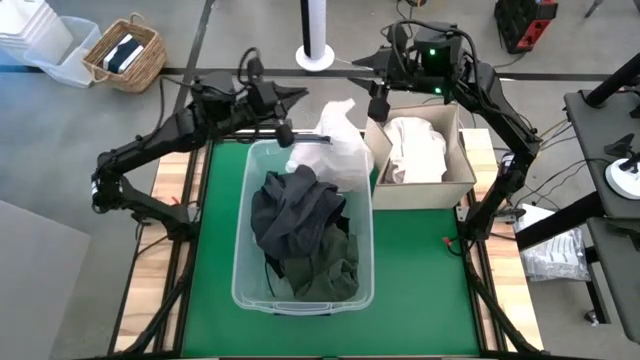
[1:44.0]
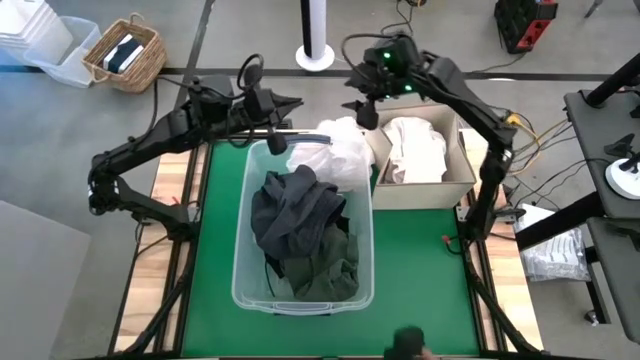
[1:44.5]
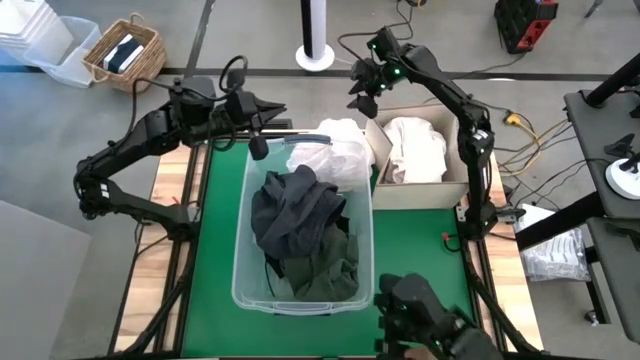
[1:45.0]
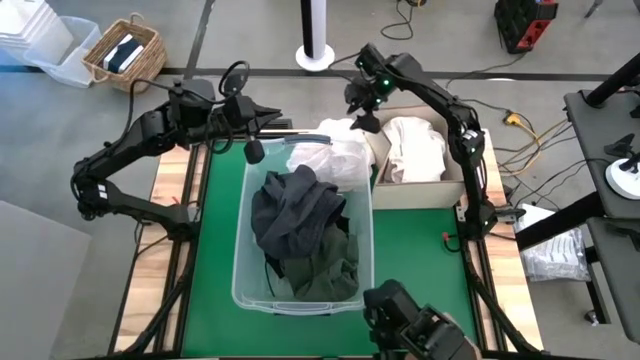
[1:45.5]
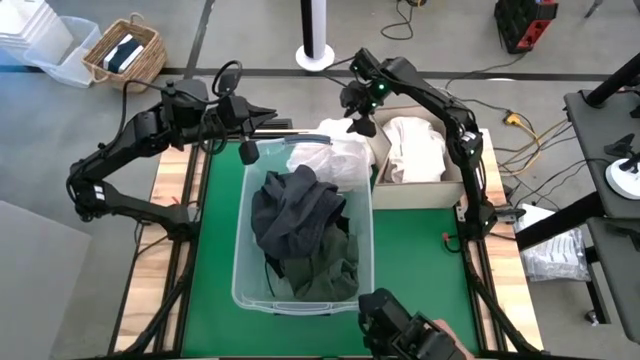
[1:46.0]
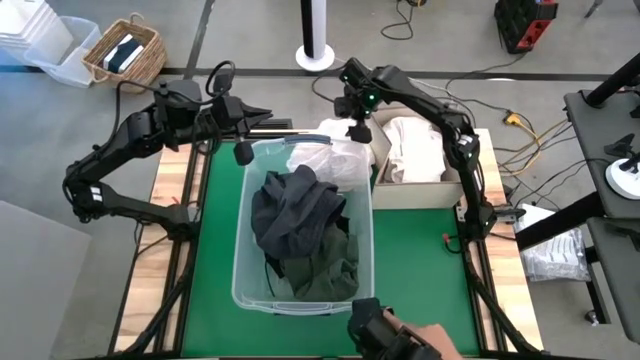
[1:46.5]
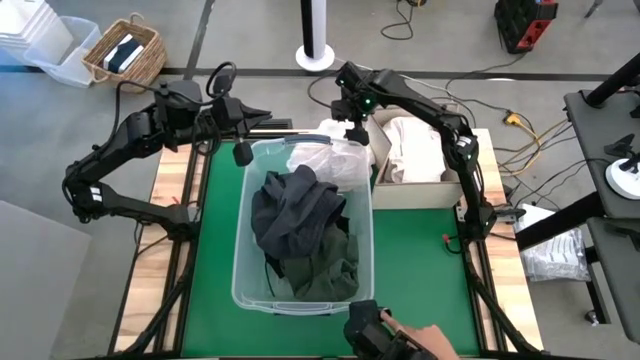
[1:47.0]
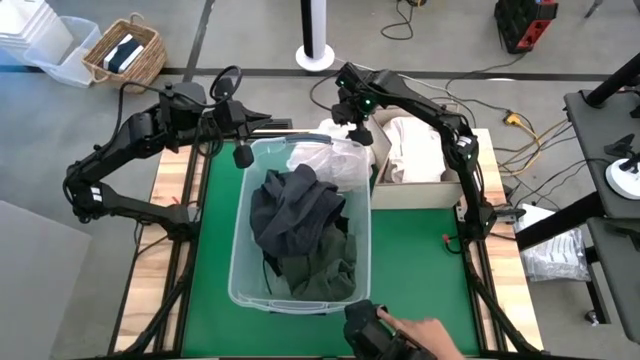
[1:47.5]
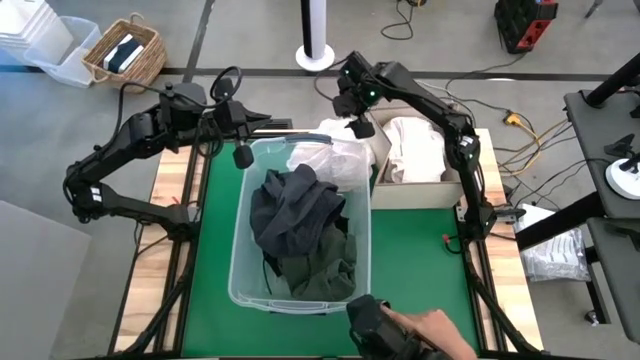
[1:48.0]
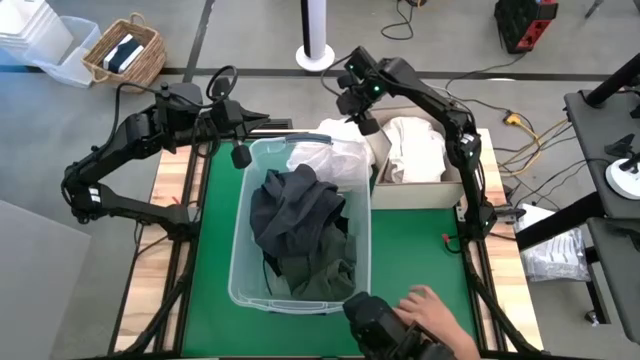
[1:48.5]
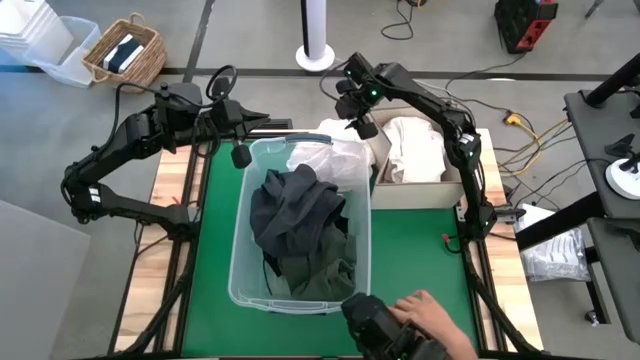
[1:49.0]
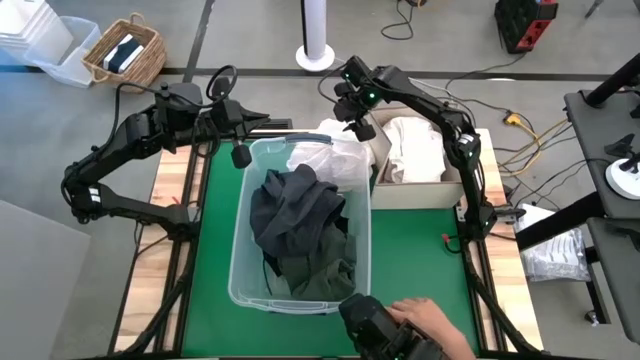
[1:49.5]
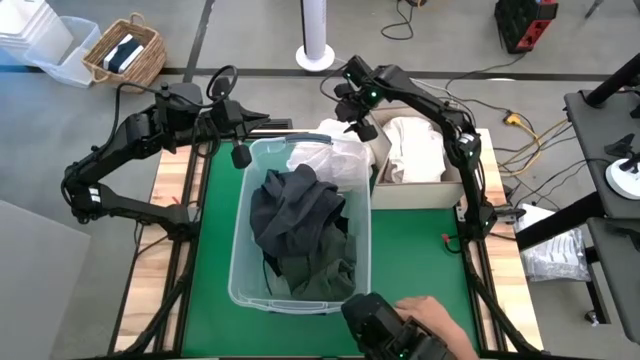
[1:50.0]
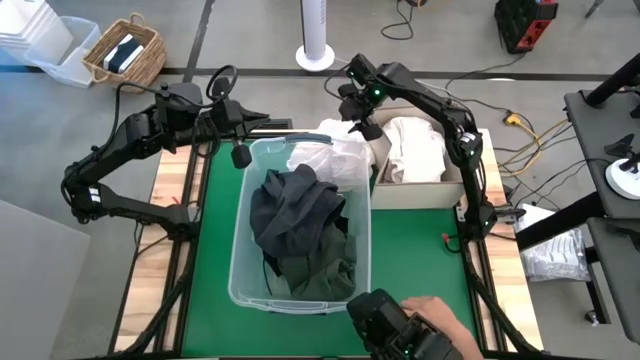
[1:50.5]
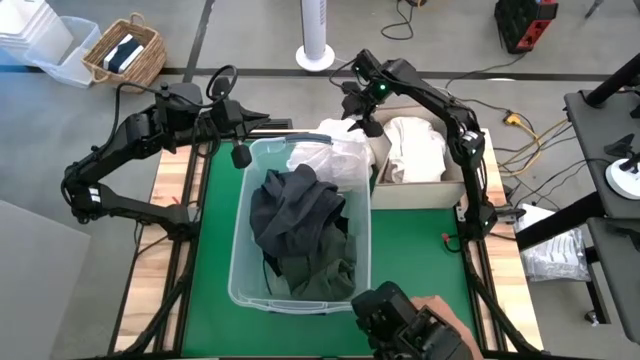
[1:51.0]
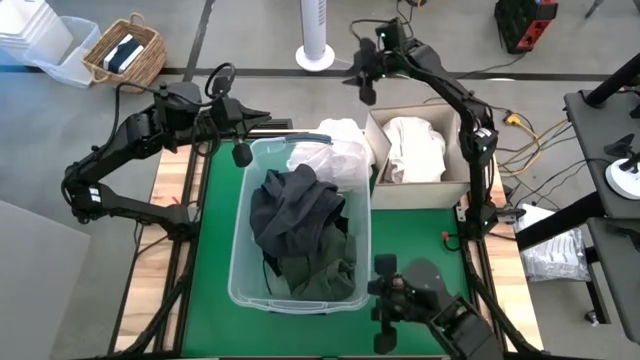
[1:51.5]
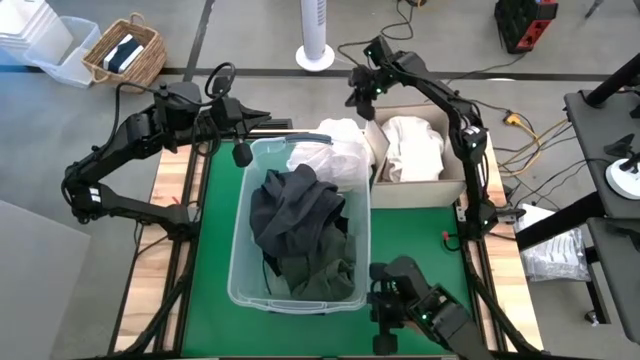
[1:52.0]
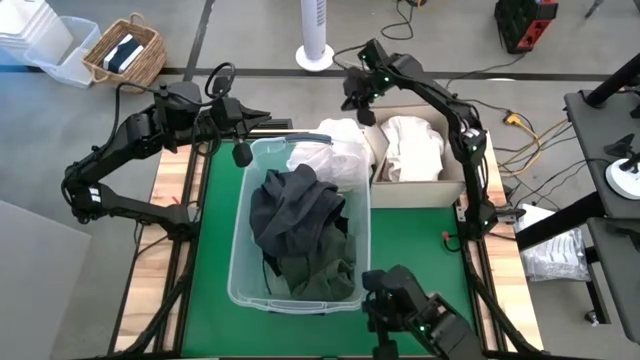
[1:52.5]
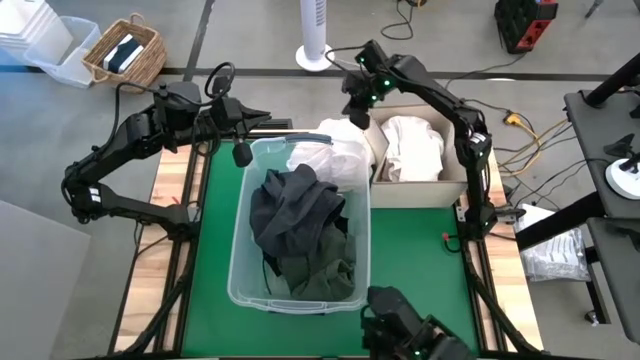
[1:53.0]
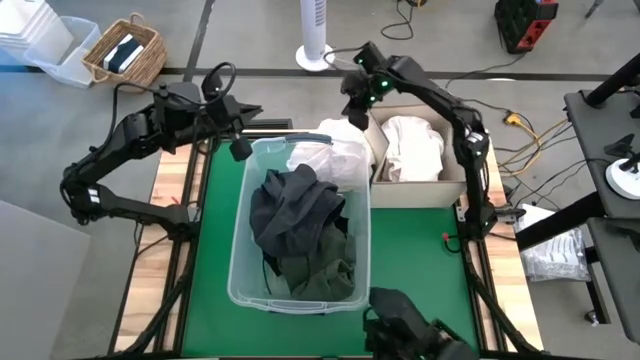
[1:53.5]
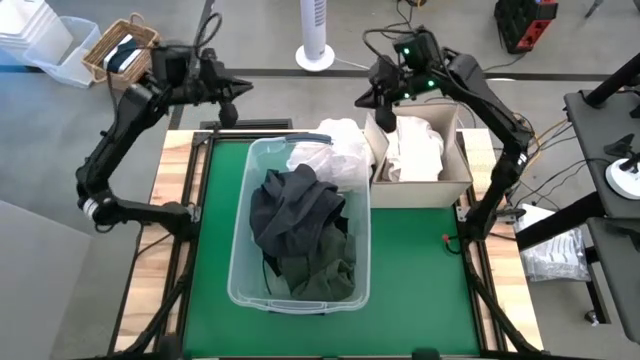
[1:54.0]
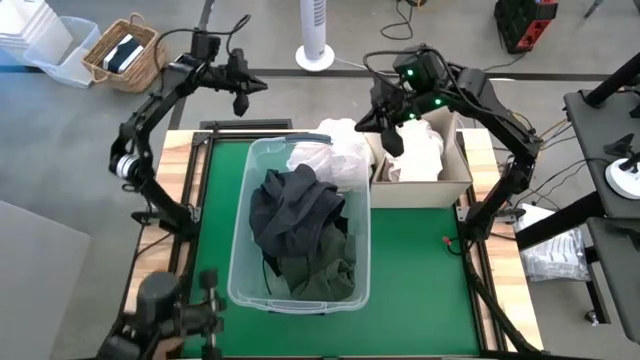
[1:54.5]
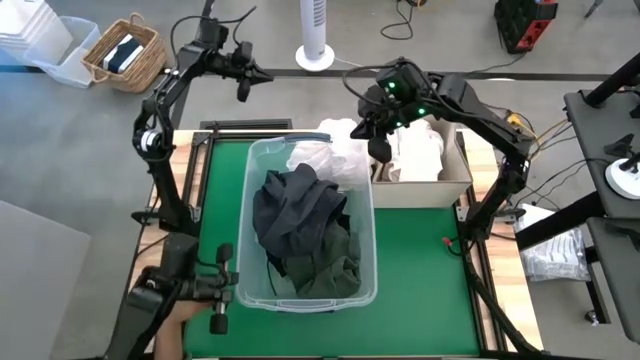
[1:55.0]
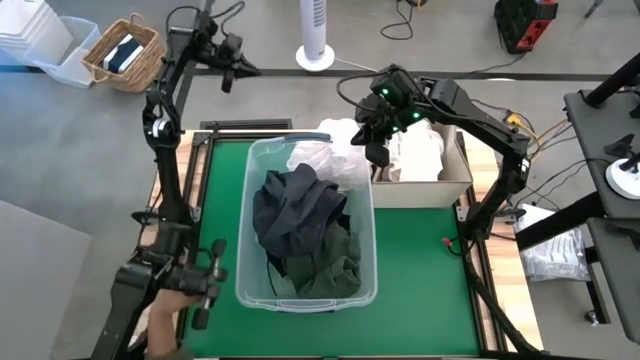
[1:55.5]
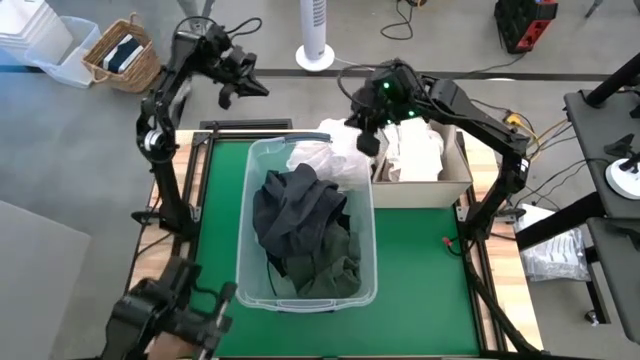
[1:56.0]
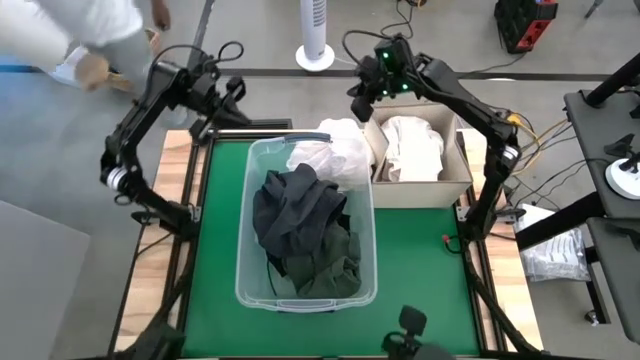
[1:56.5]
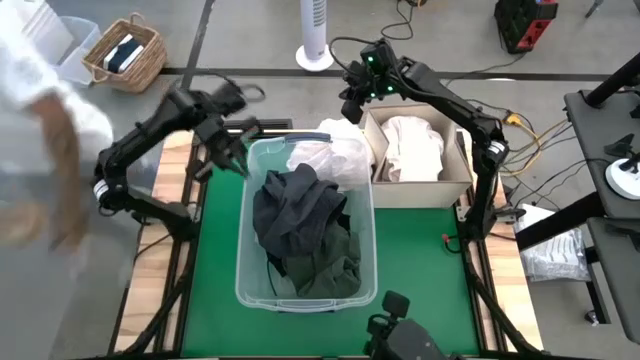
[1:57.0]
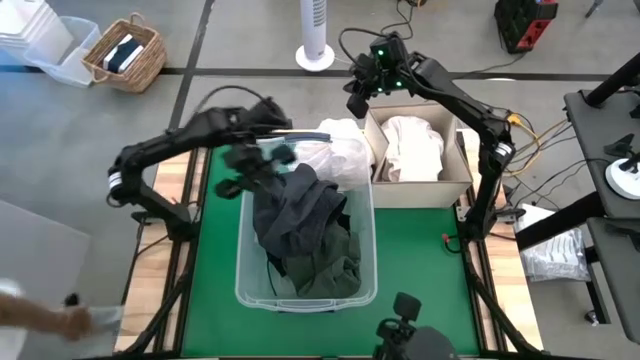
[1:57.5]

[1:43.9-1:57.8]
Put the white blouse into the laundry organizer

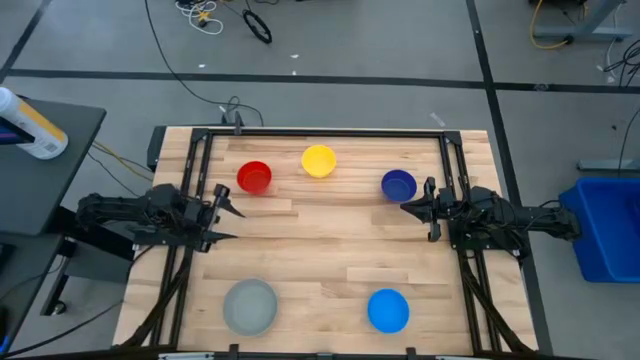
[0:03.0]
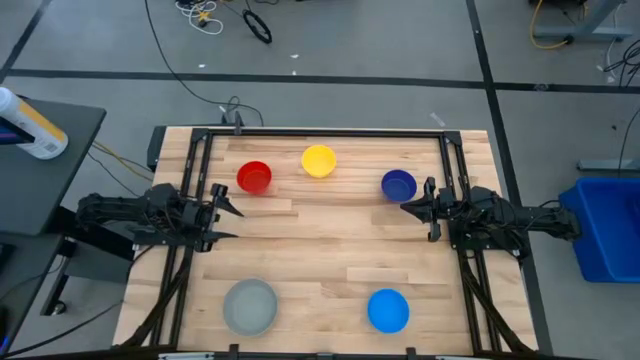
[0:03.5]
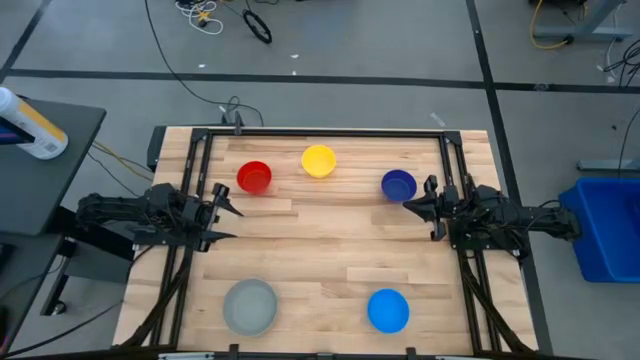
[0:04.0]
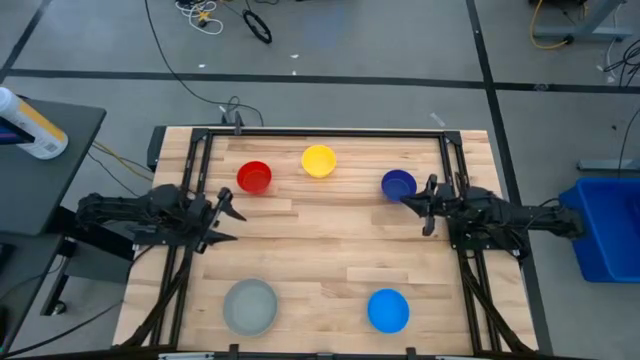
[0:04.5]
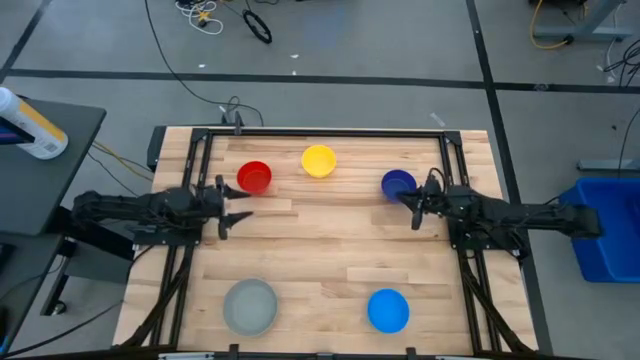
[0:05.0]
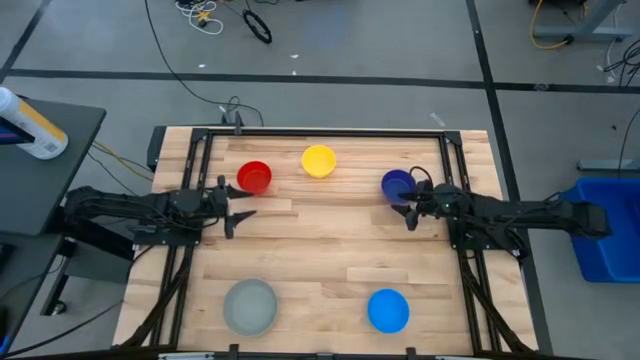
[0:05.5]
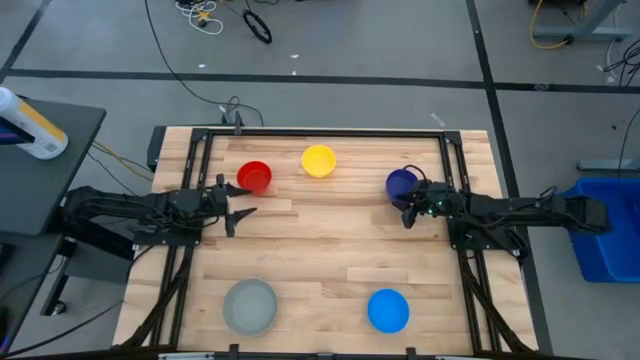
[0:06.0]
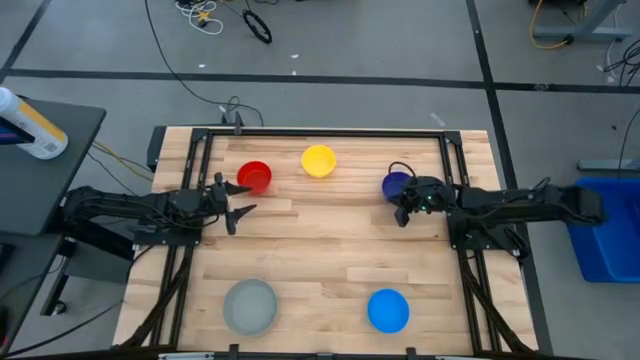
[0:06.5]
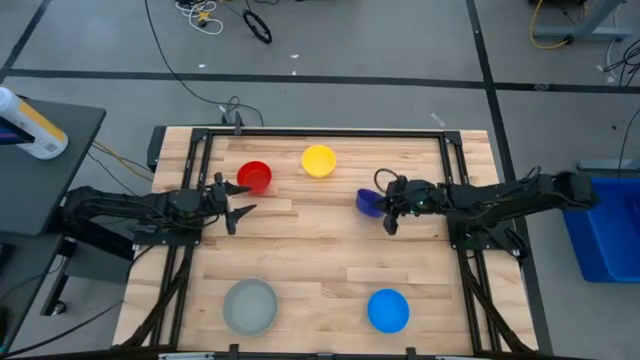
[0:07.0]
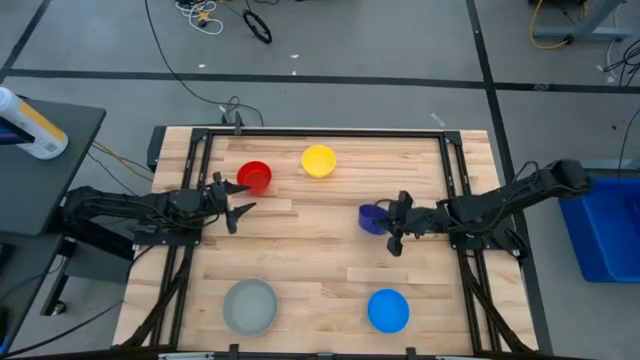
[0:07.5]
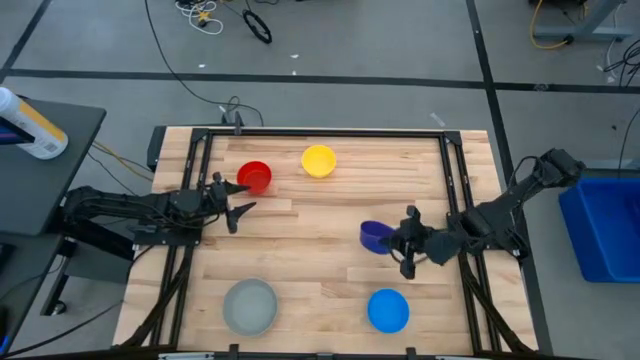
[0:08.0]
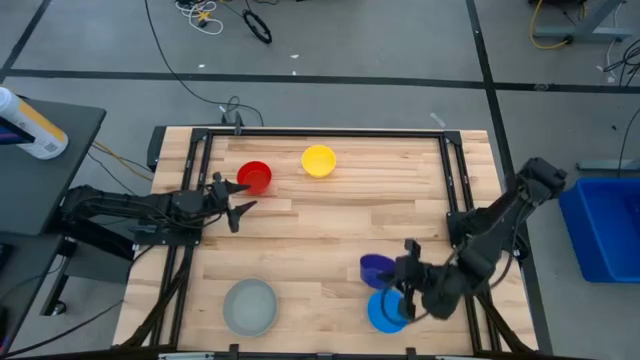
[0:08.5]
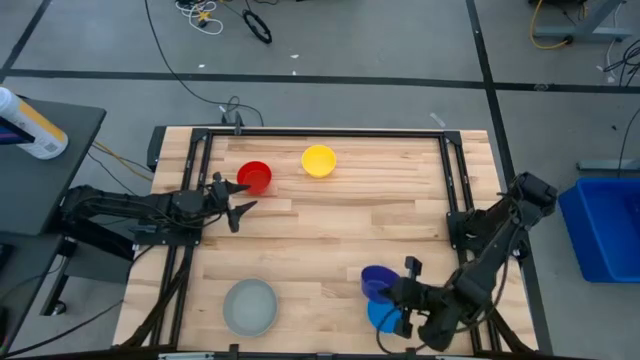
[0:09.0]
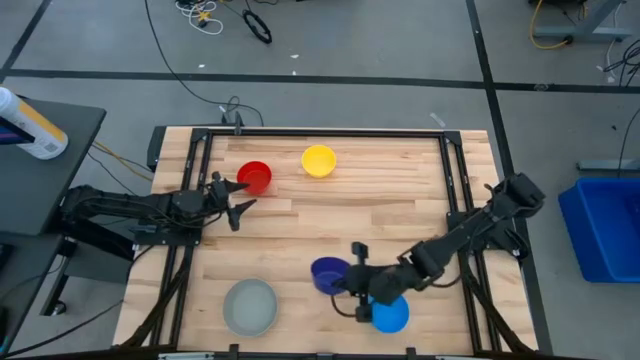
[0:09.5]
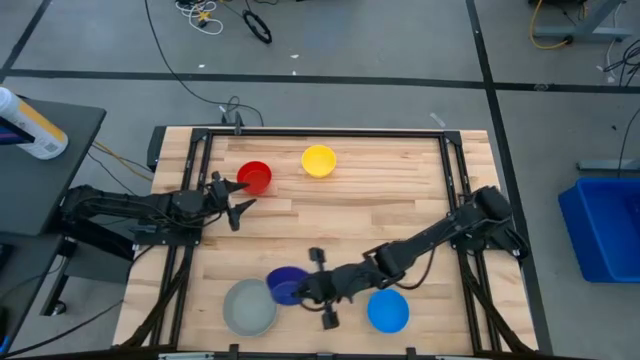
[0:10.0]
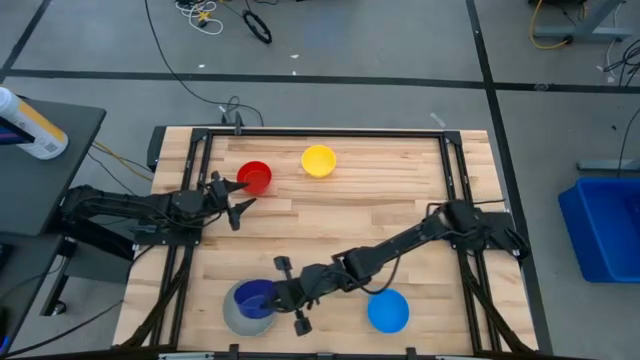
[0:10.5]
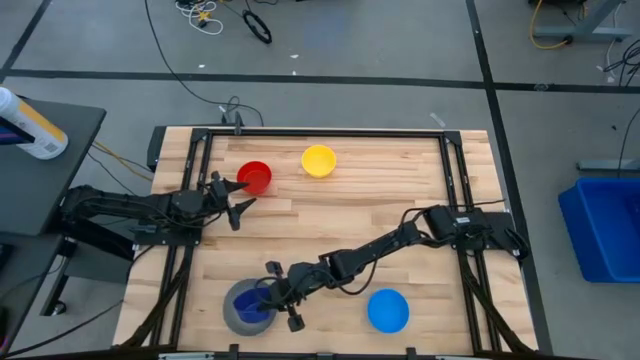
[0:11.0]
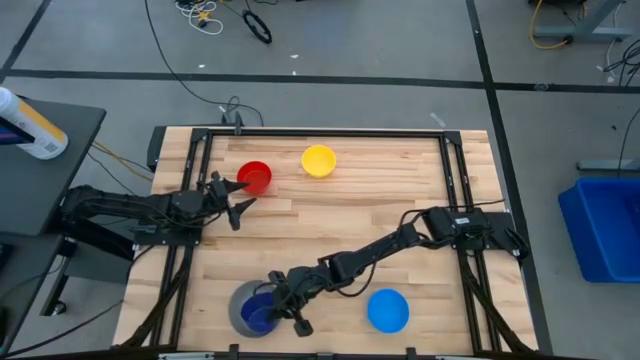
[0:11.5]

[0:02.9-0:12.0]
Stack the dark blue bowl on top of the gray bowl
